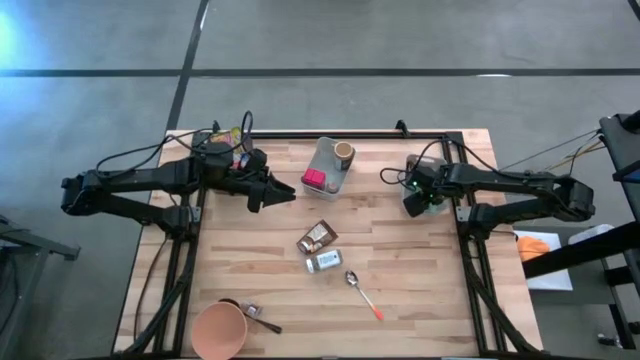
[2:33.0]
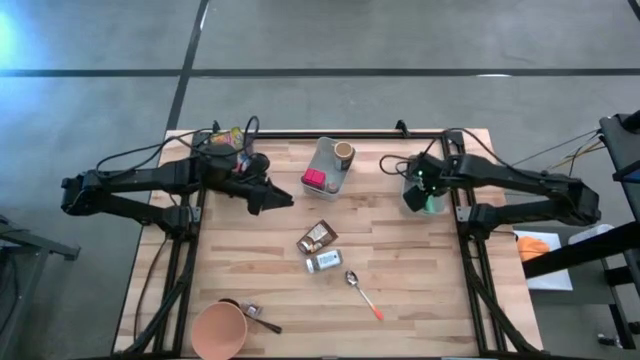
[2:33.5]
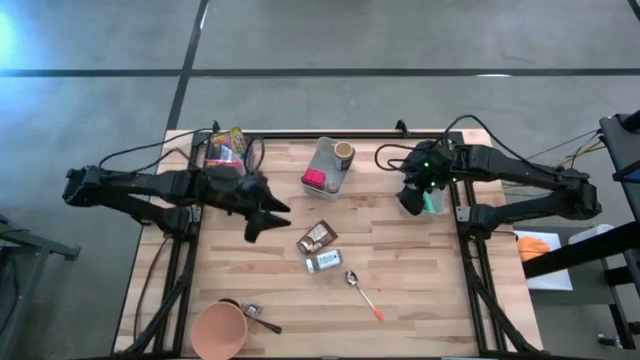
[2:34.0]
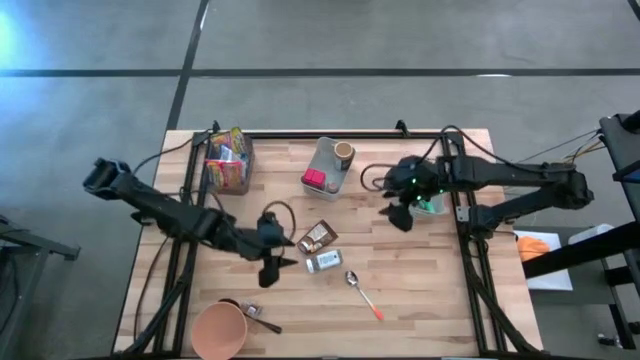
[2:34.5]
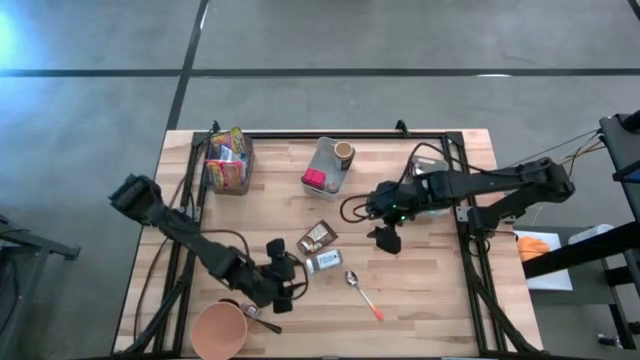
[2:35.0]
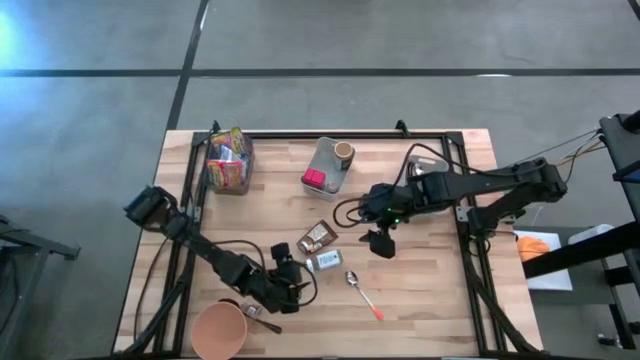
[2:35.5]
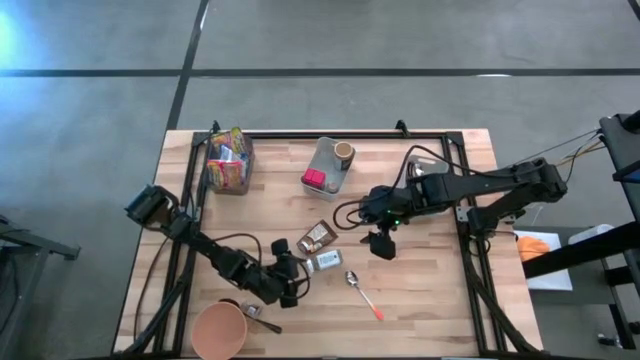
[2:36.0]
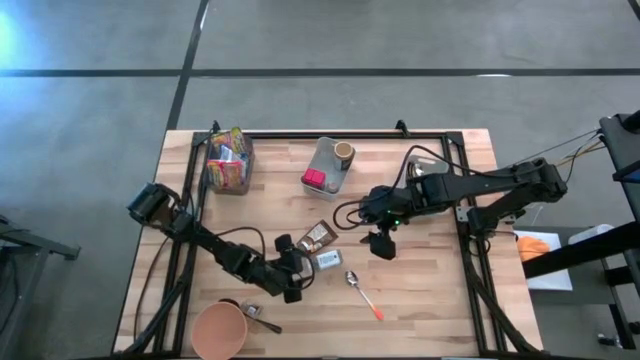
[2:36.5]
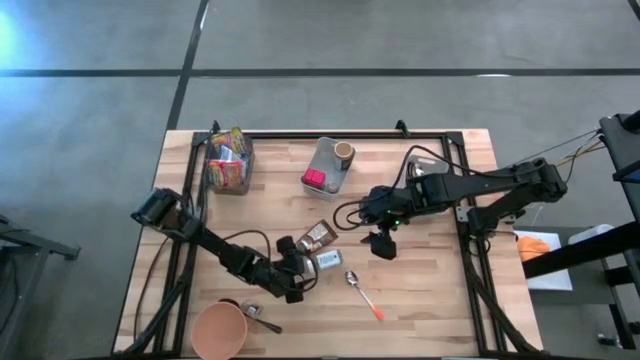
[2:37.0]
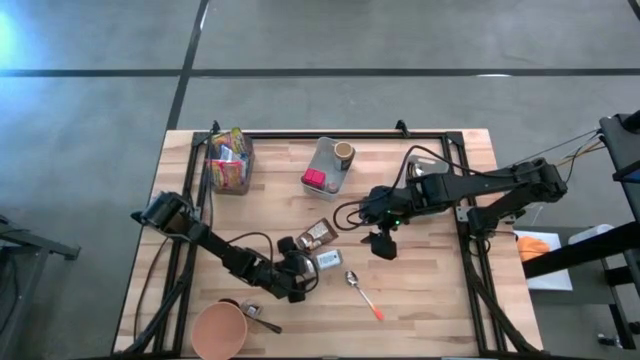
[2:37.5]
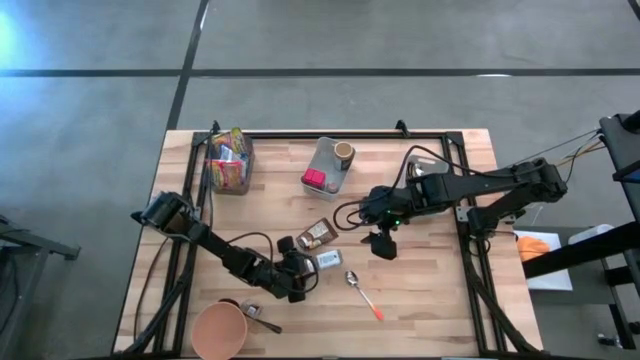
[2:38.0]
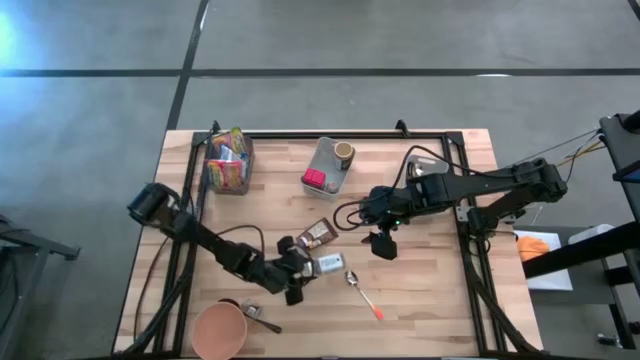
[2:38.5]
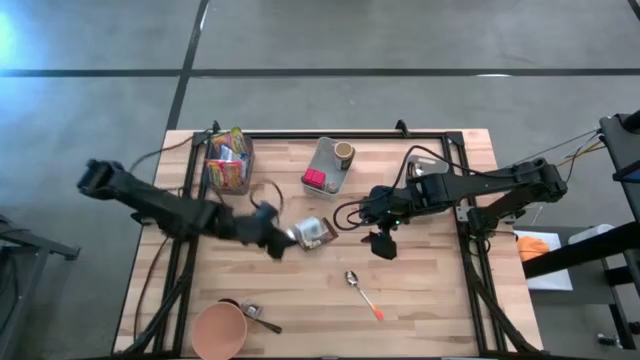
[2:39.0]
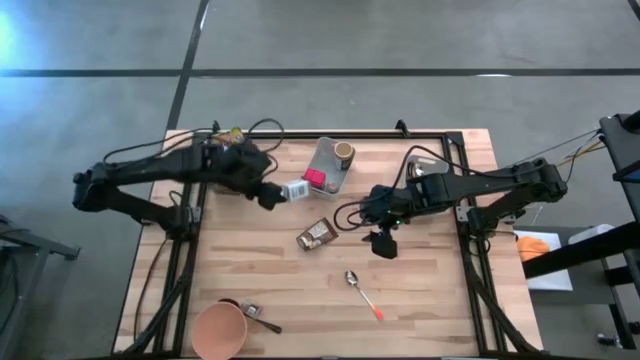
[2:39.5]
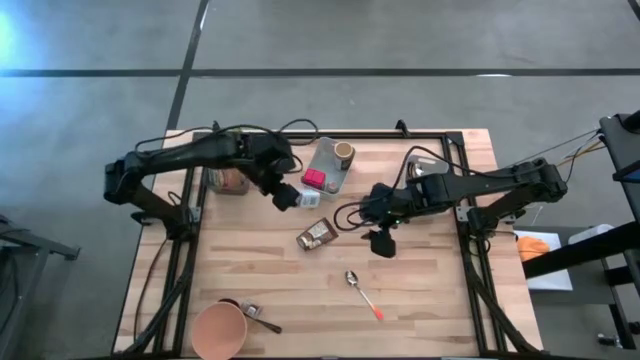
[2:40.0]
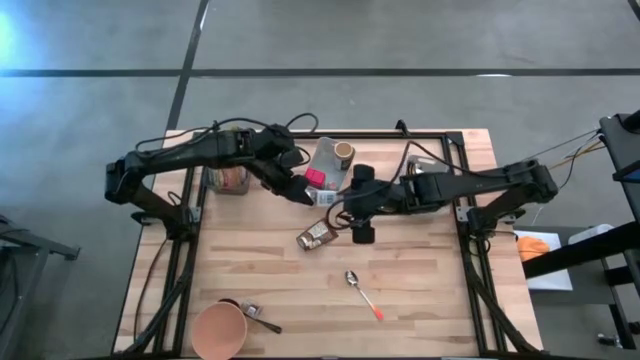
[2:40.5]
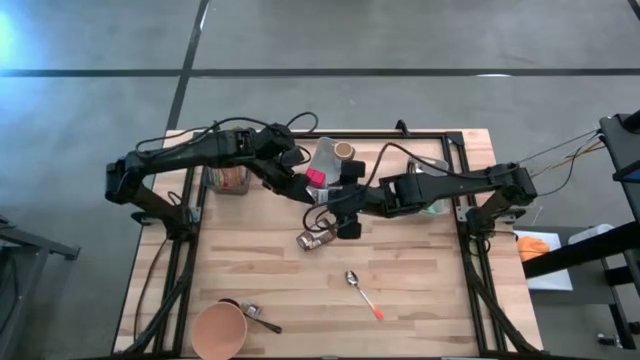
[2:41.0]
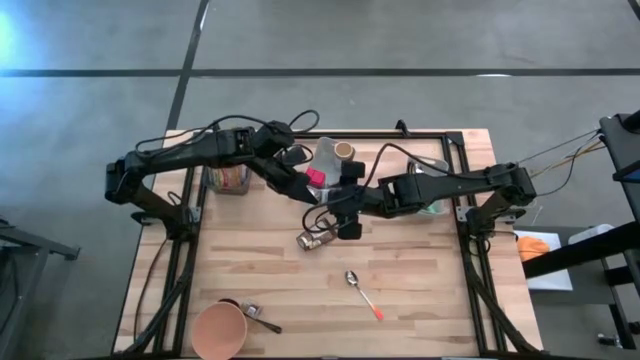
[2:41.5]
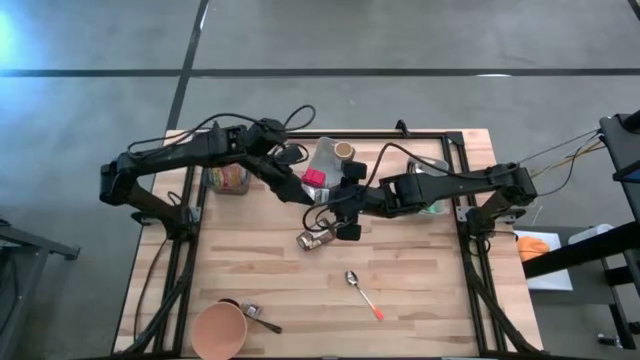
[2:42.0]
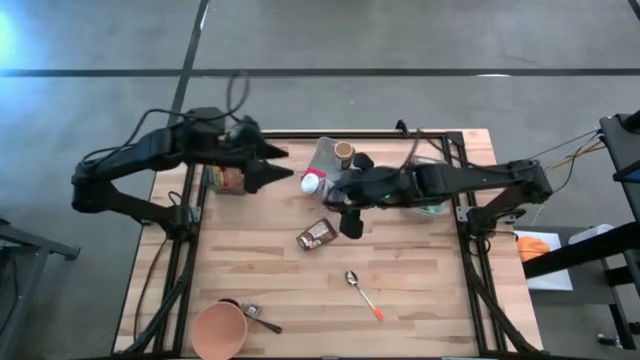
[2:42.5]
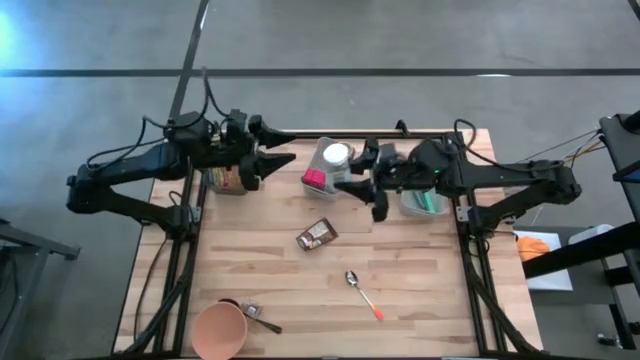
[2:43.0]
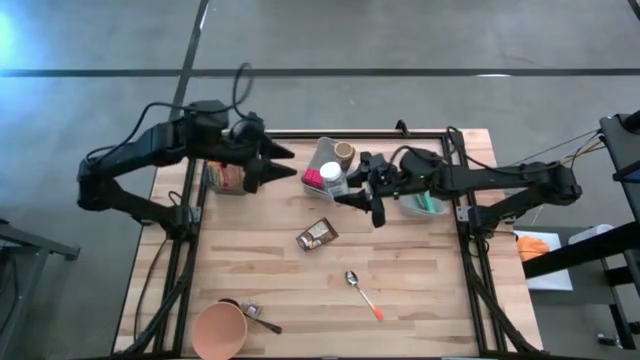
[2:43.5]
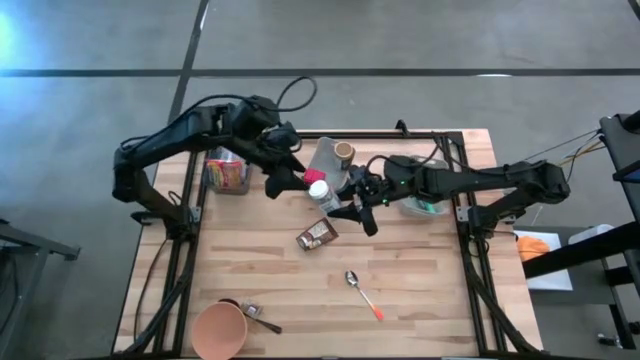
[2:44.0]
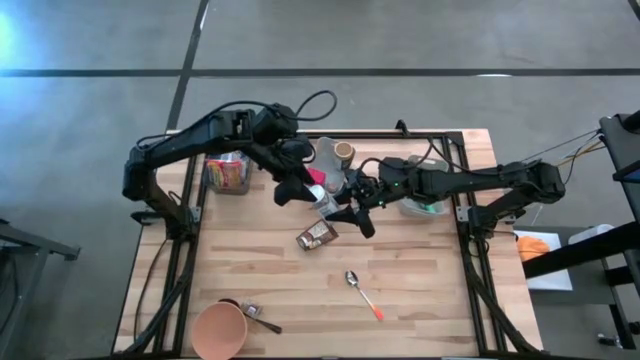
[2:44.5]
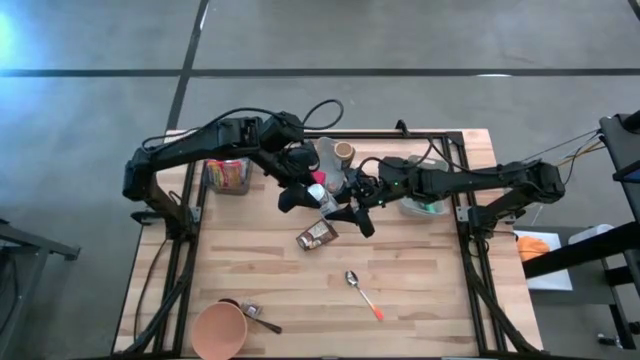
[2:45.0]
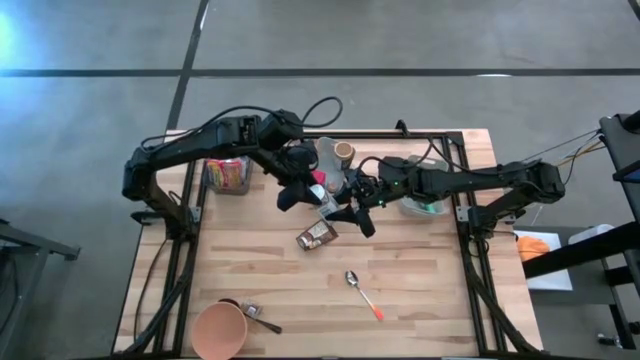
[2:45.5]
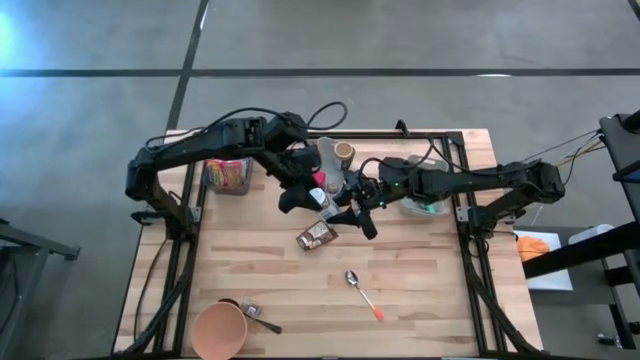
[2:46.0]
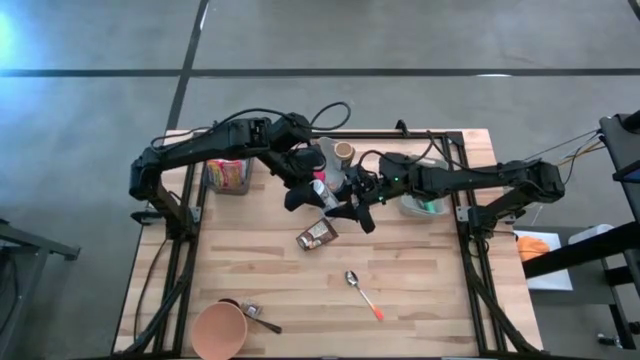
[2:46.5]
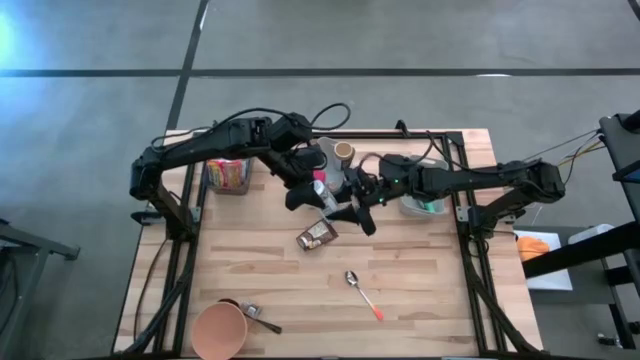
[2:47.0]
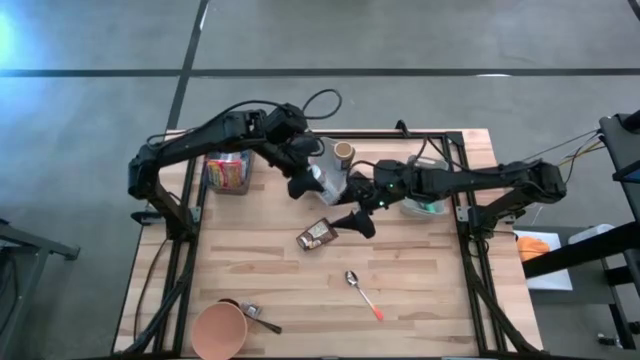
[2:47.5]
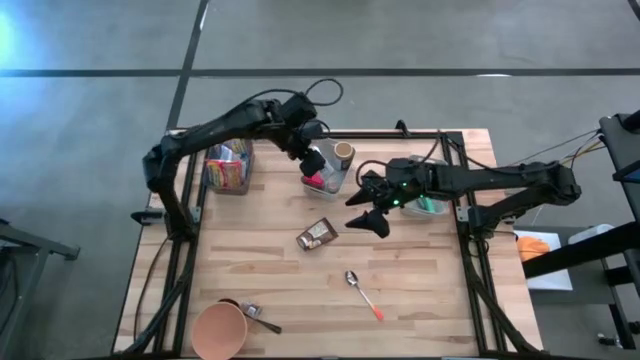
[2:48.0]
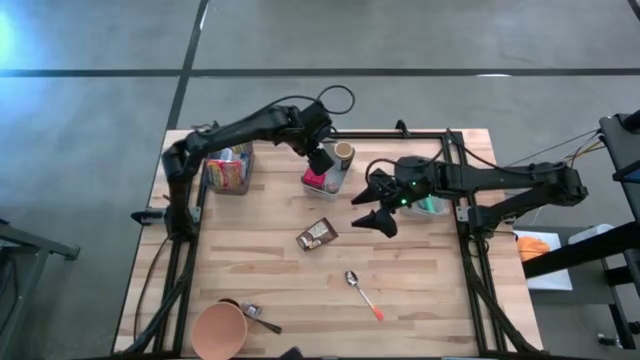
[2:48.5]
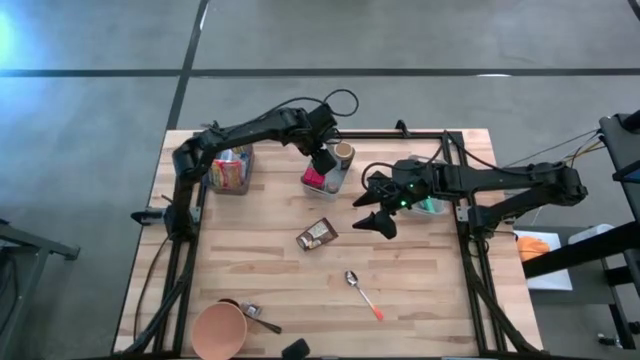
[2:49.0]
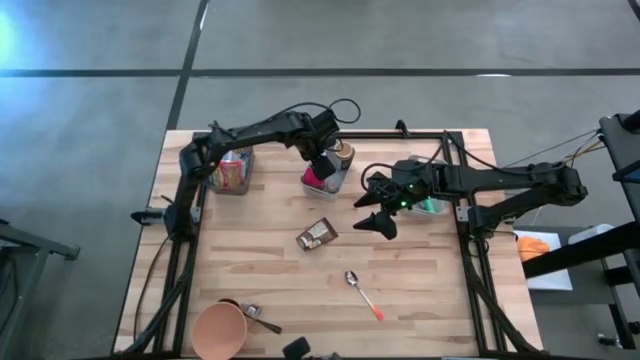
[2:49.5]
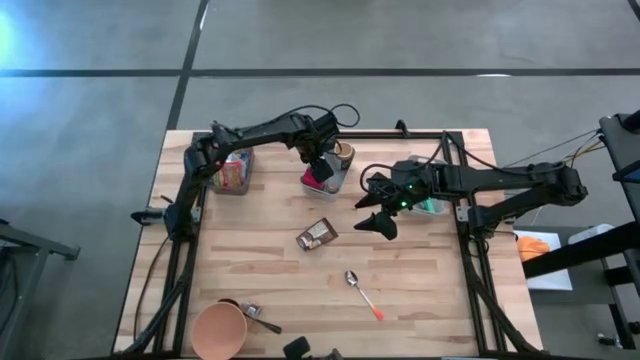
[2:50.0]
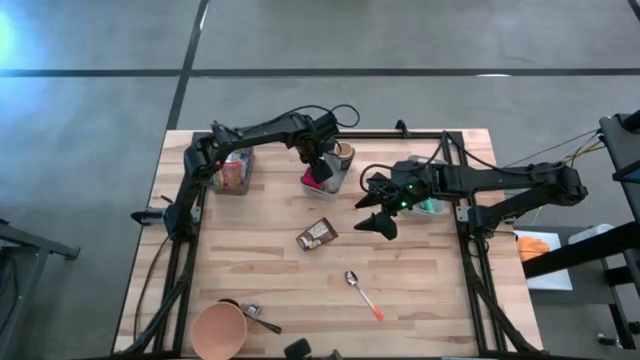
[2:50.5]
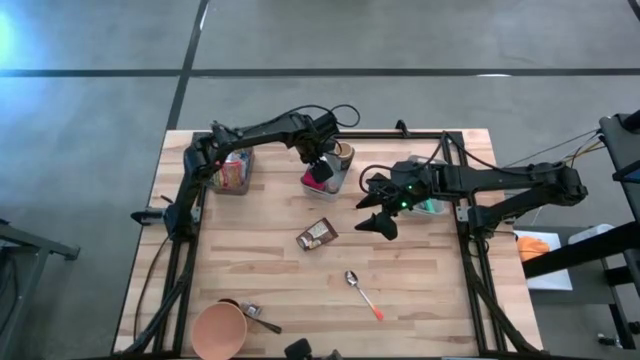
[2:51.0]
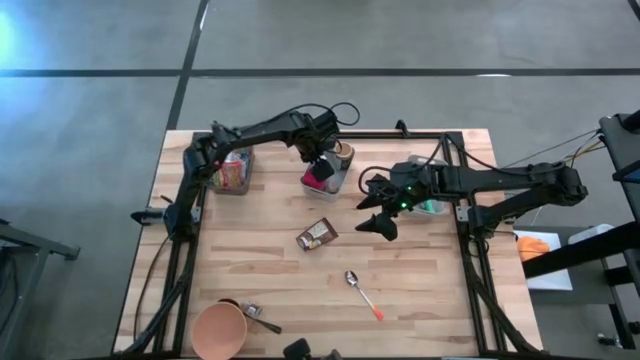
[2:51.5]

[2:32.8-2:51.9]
Put the white seasoning bottle into the left gray bin
